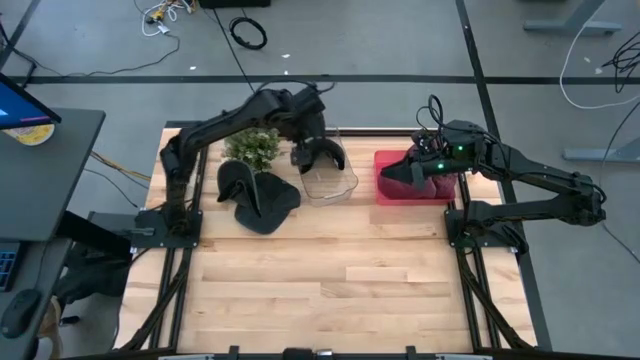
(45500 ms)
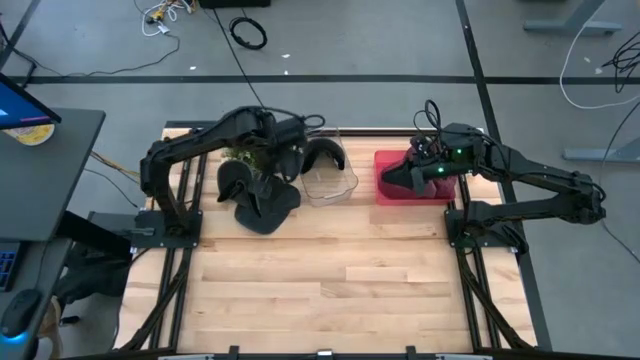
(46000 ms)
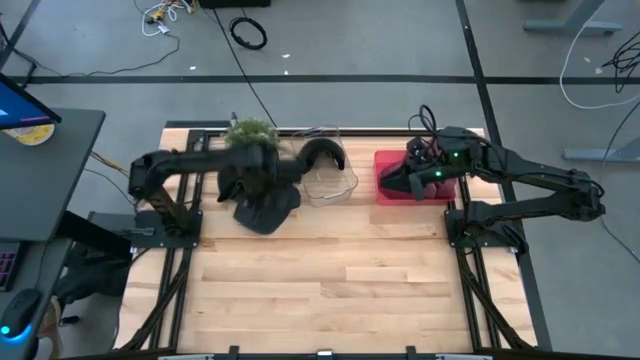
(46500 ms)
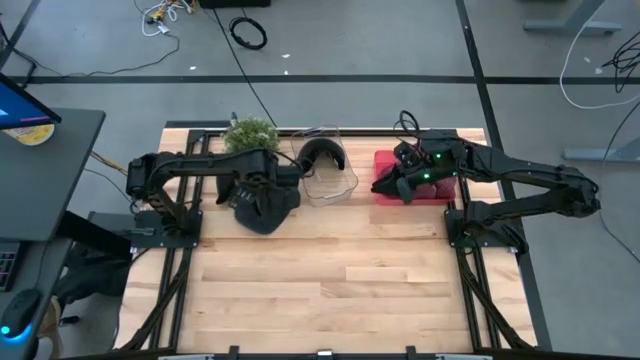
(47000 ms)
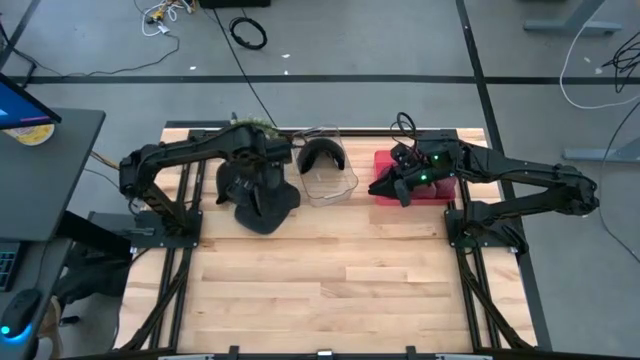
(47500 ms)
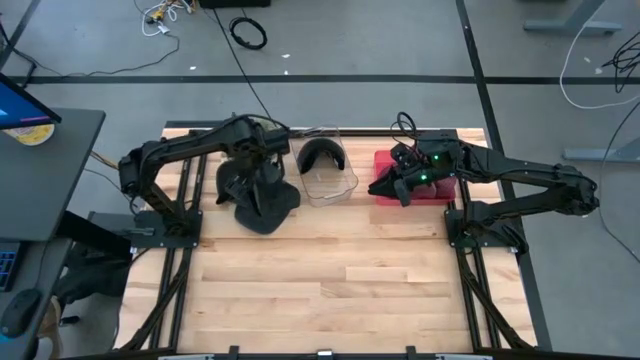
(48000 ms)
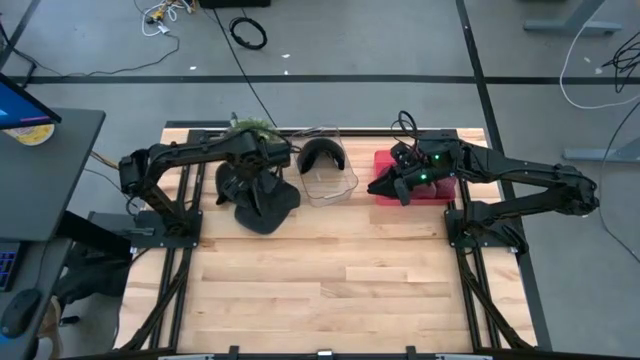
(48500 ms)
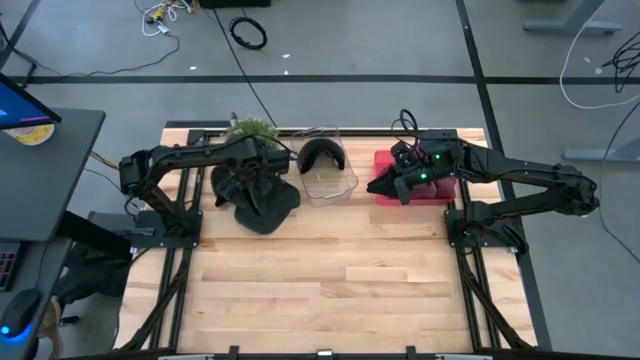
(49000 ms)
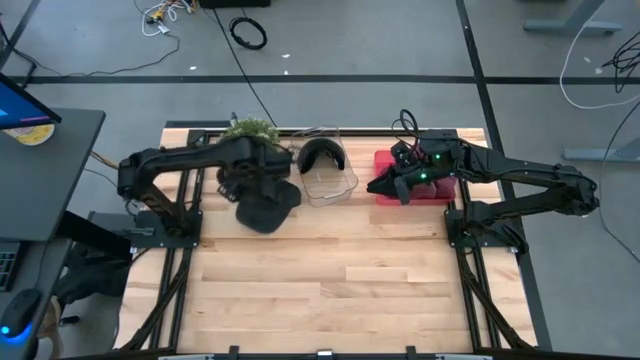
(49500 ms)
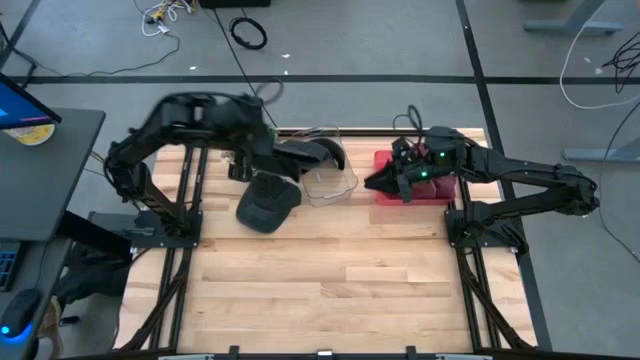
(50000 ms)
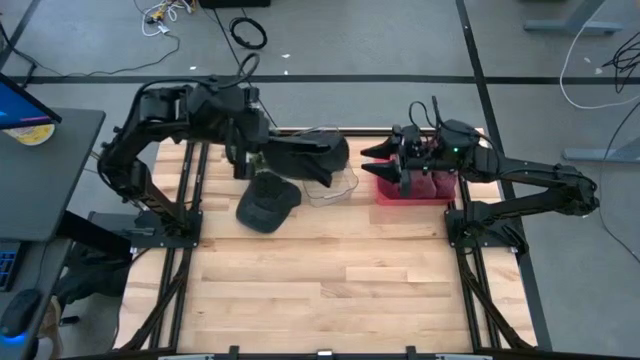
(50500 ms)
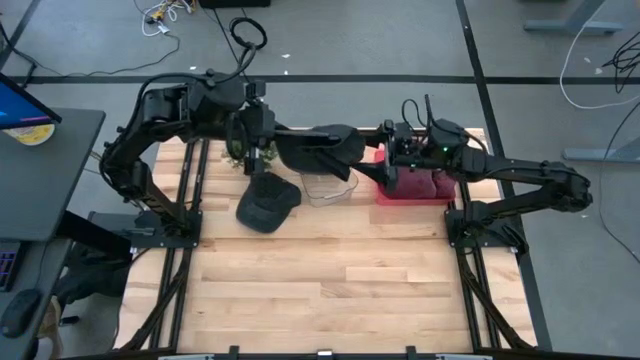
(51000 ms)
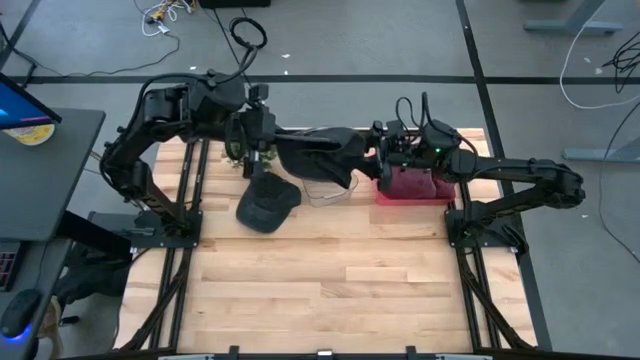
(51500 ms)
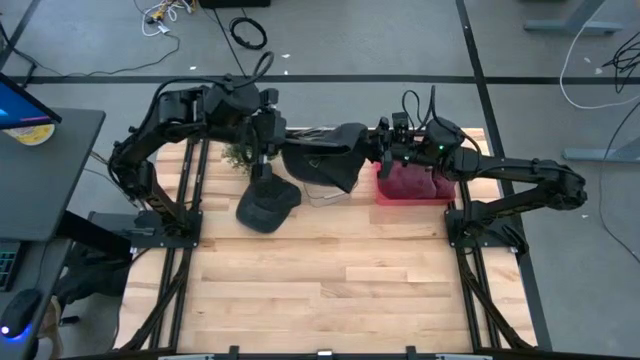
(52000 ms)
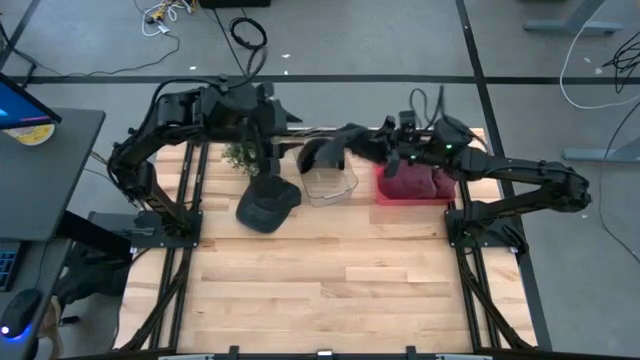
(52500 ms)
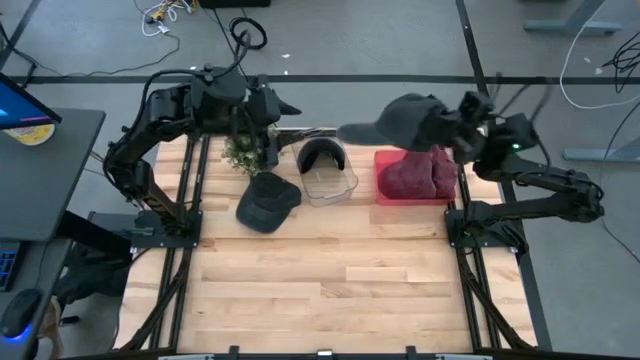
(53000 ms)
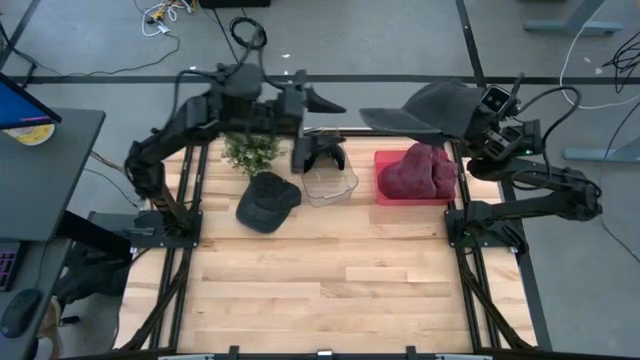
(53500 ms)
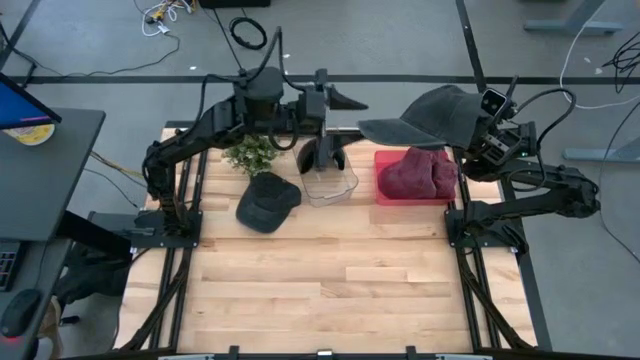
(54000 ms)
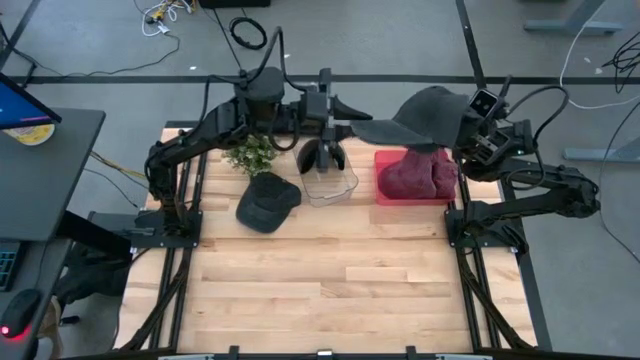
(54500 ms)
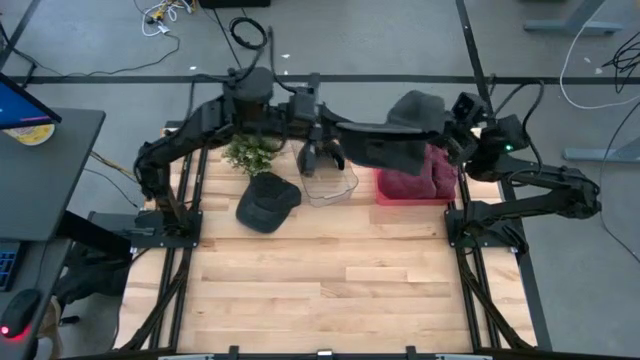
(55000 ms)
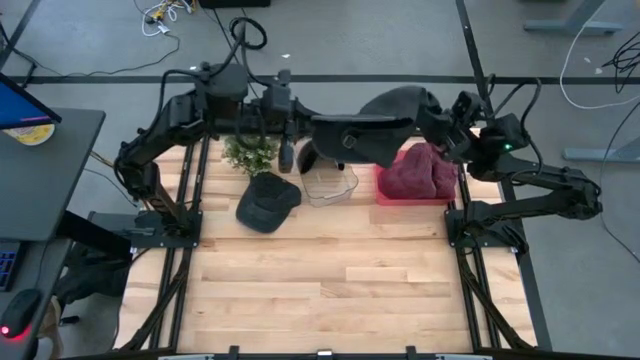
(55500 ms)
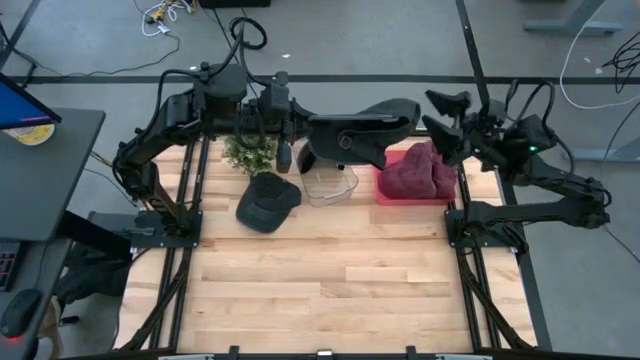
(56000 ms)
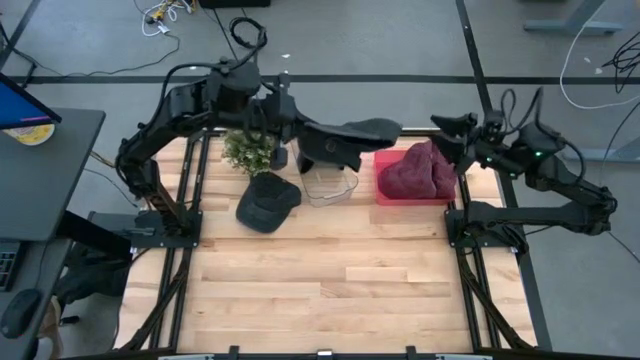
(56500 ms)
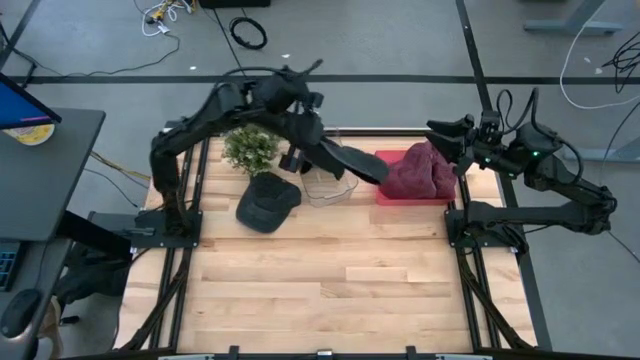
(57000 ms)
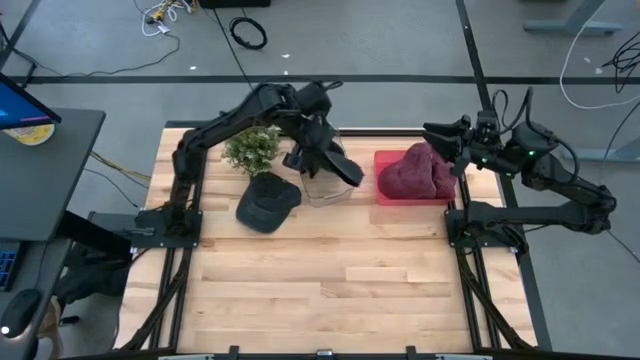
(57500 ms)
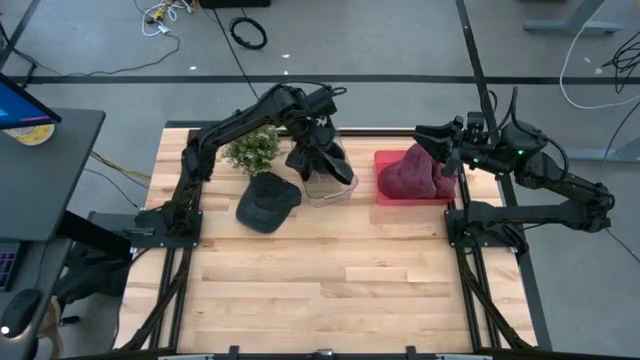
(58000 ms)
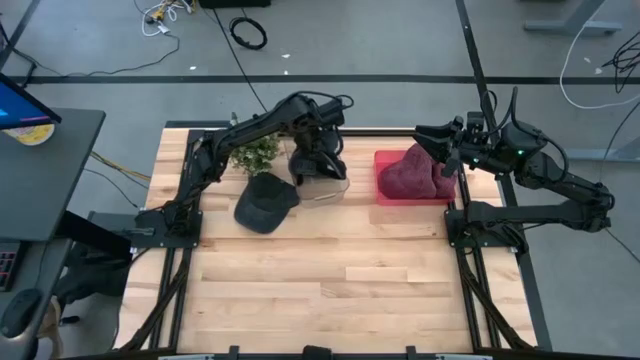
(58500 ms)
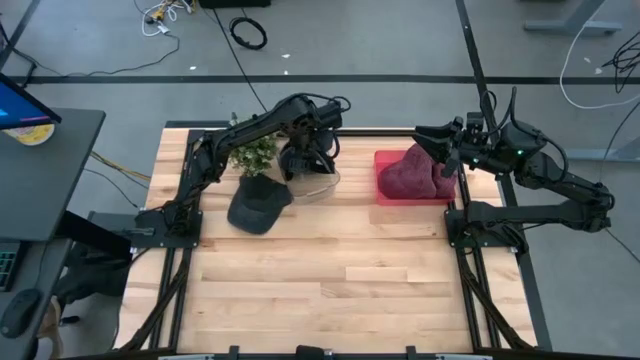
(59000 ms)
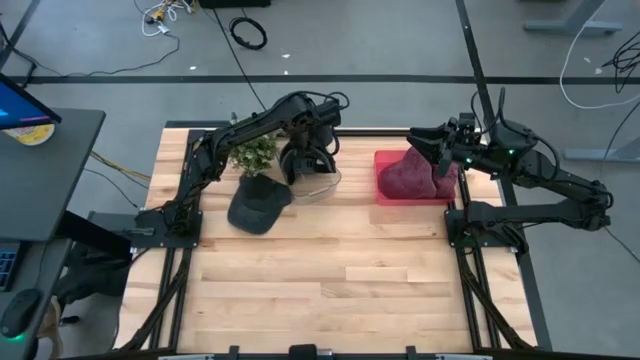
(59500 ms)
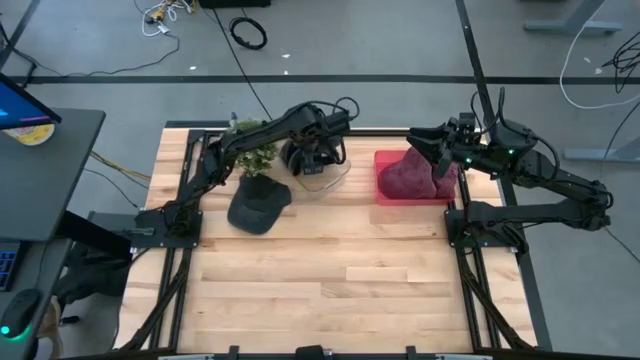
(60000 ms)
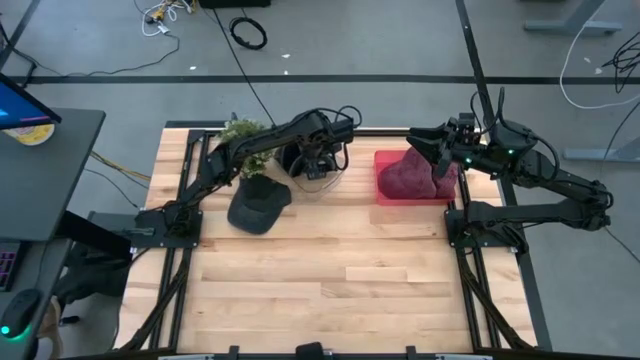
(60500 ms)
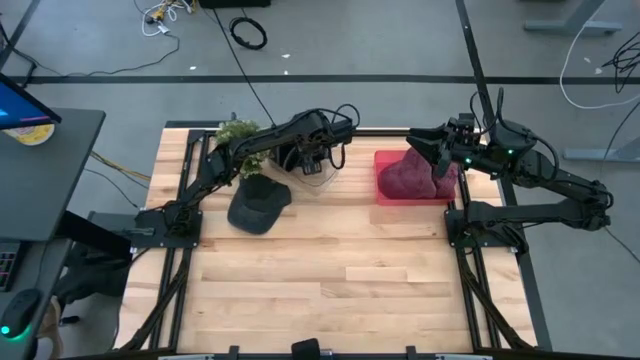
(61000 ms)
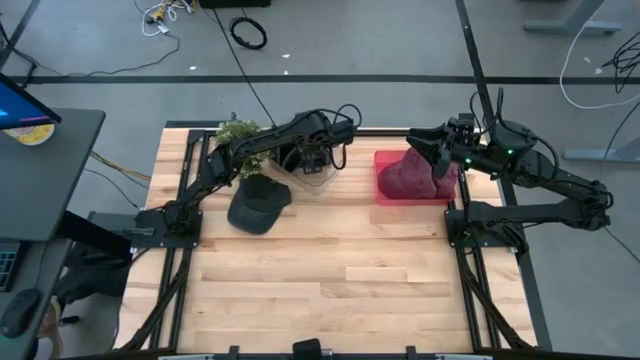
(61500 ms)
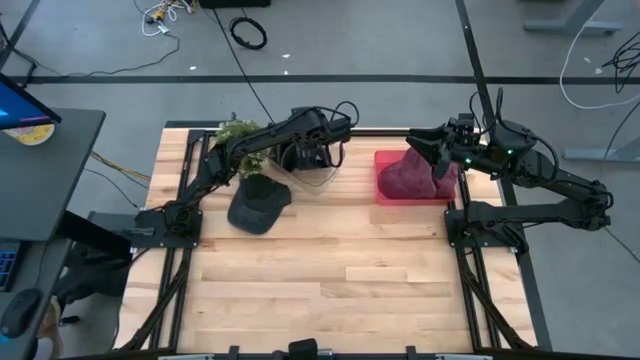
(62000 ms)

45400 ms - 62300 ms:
Task: Pick & Place hat
Put the left black cap into the transparent bin
